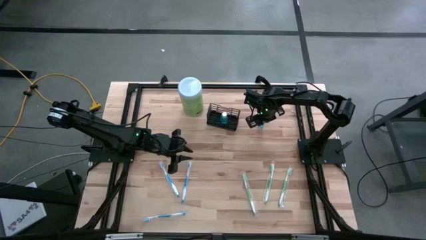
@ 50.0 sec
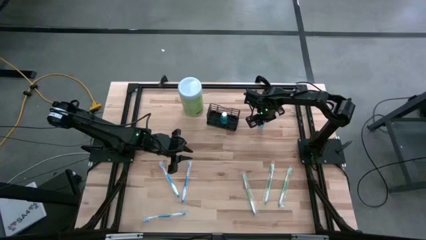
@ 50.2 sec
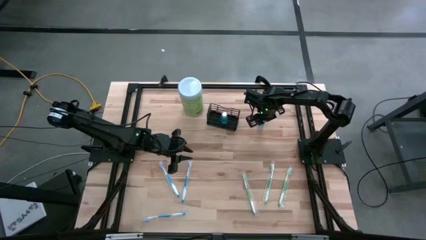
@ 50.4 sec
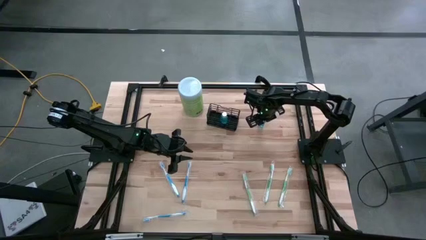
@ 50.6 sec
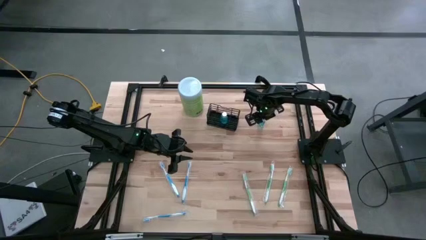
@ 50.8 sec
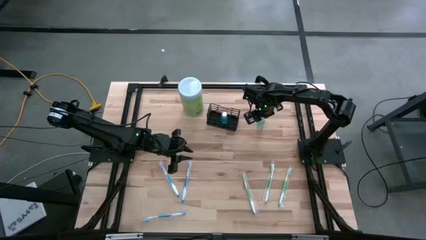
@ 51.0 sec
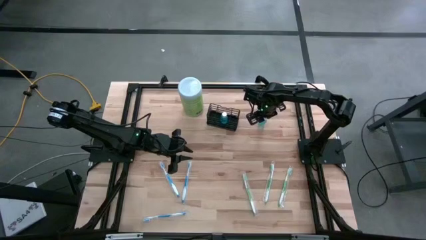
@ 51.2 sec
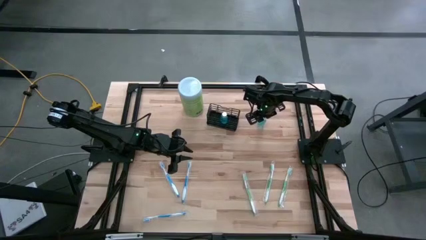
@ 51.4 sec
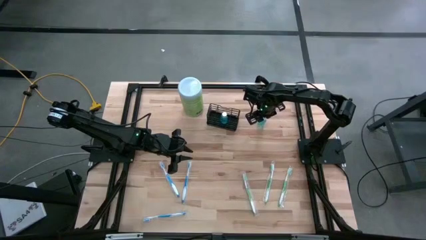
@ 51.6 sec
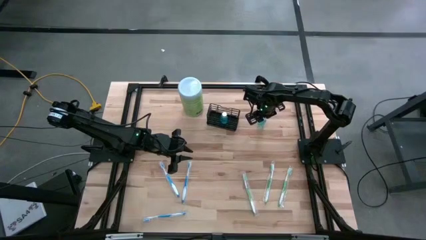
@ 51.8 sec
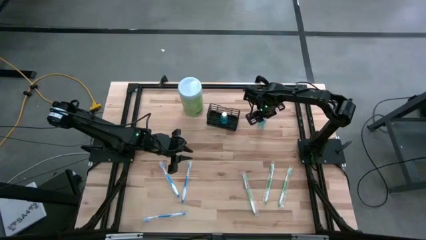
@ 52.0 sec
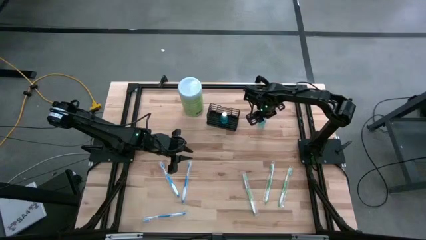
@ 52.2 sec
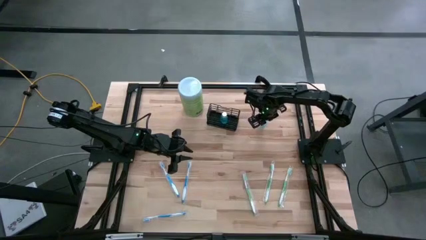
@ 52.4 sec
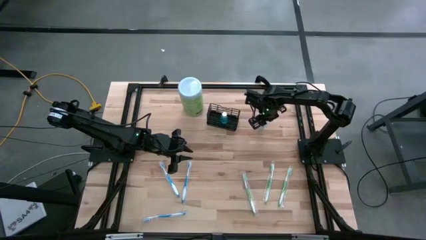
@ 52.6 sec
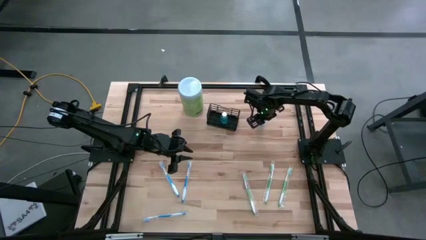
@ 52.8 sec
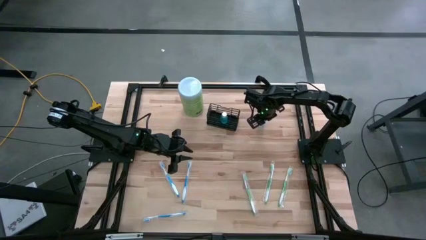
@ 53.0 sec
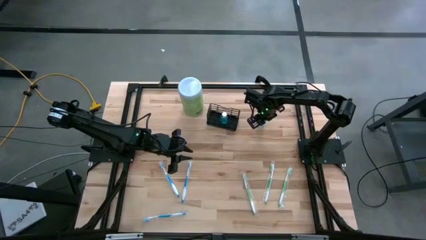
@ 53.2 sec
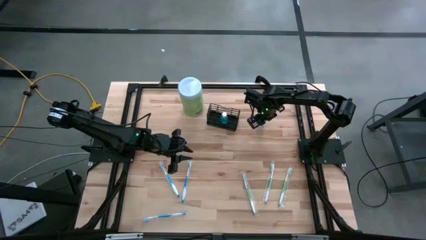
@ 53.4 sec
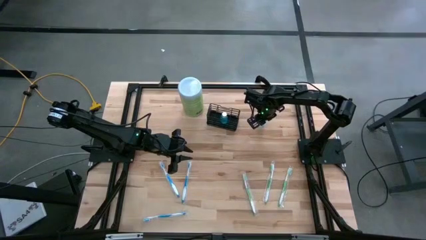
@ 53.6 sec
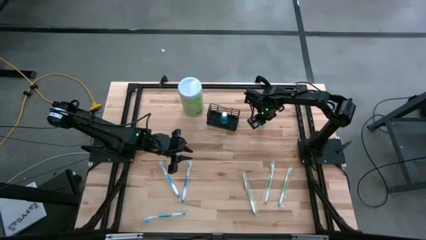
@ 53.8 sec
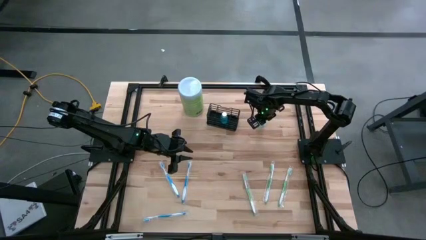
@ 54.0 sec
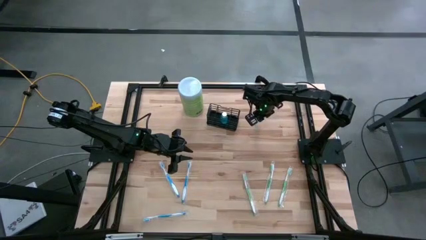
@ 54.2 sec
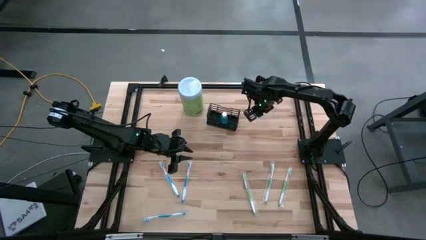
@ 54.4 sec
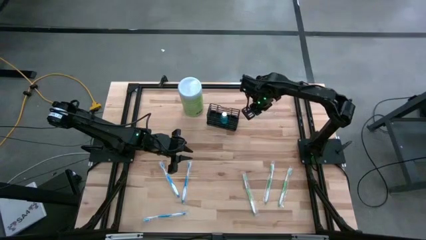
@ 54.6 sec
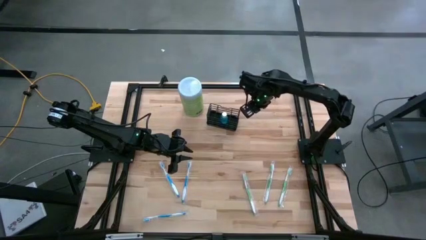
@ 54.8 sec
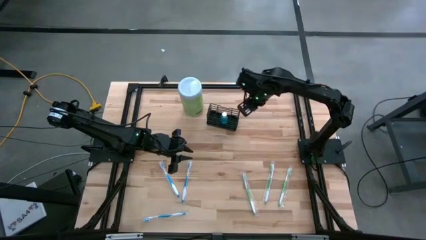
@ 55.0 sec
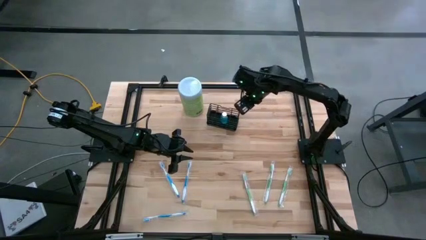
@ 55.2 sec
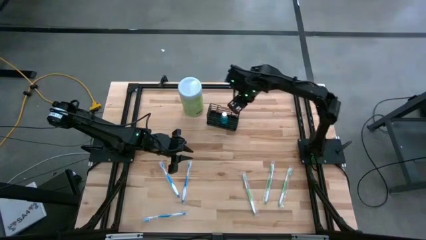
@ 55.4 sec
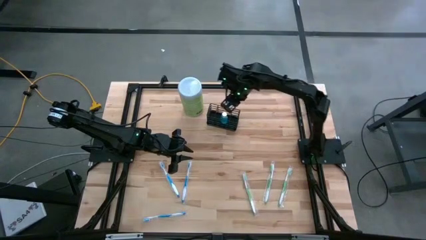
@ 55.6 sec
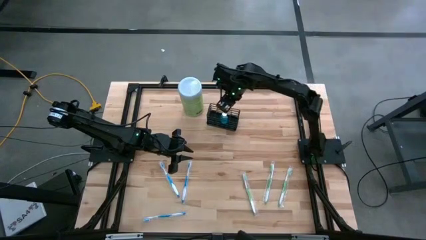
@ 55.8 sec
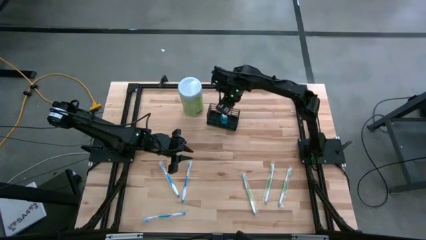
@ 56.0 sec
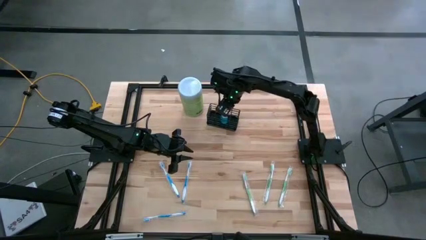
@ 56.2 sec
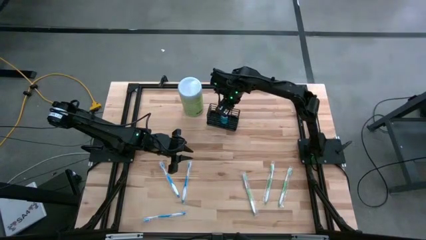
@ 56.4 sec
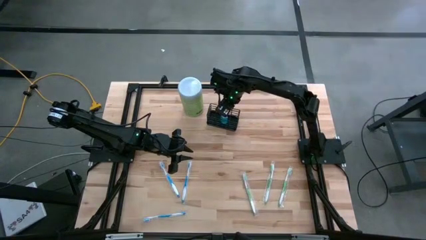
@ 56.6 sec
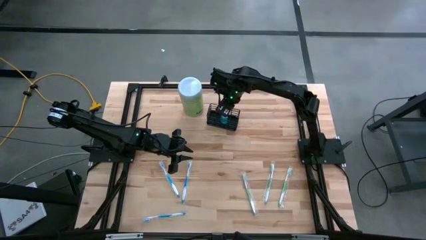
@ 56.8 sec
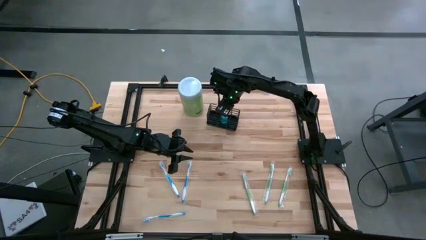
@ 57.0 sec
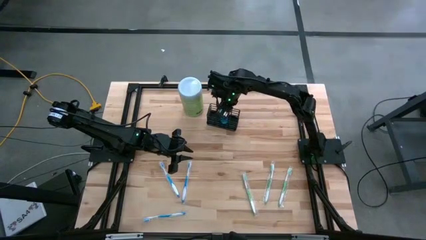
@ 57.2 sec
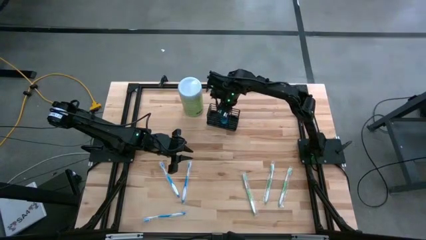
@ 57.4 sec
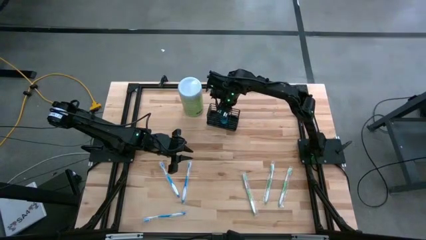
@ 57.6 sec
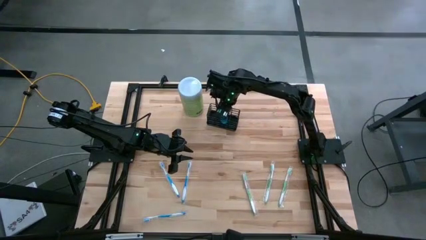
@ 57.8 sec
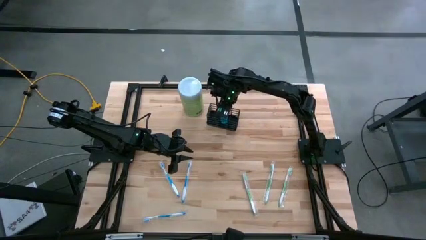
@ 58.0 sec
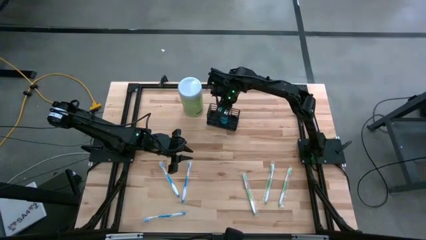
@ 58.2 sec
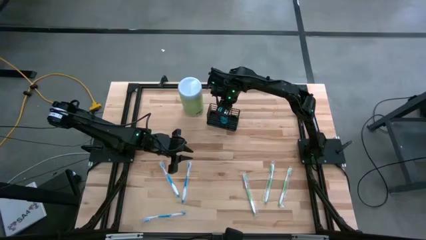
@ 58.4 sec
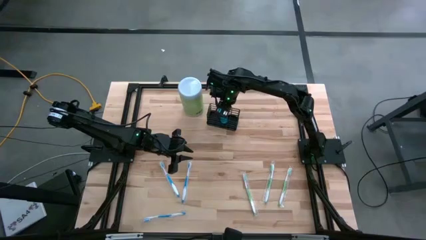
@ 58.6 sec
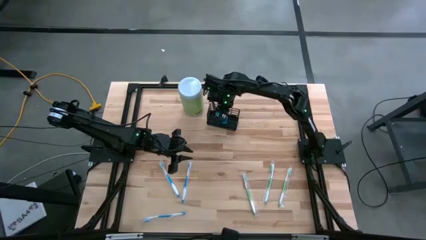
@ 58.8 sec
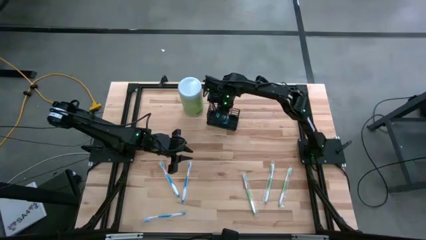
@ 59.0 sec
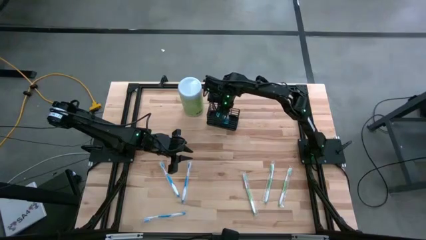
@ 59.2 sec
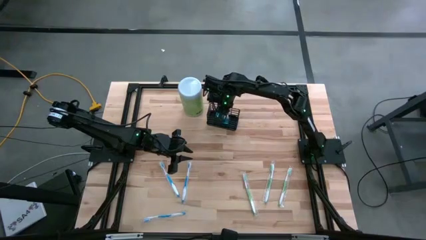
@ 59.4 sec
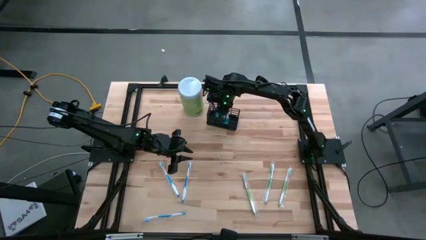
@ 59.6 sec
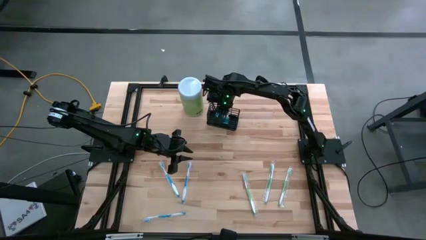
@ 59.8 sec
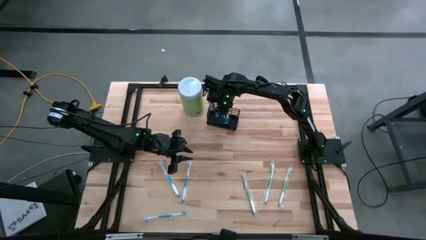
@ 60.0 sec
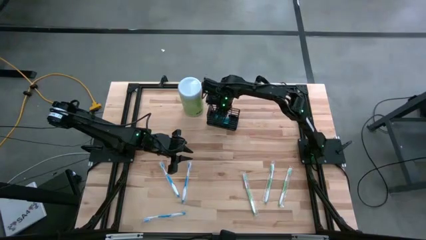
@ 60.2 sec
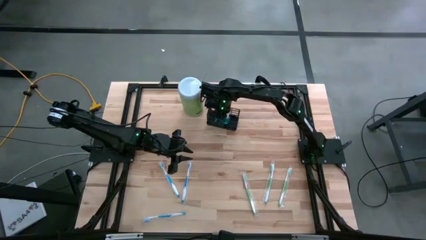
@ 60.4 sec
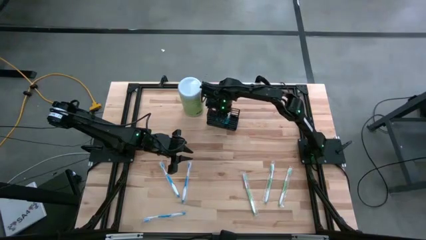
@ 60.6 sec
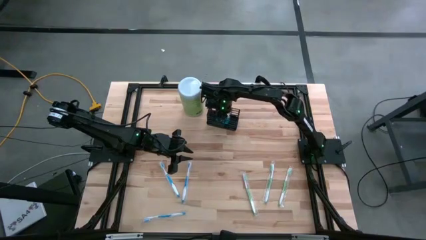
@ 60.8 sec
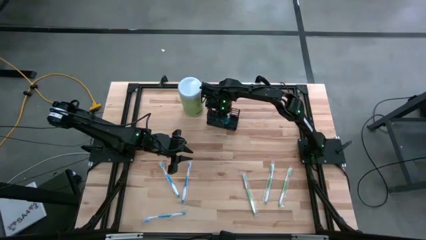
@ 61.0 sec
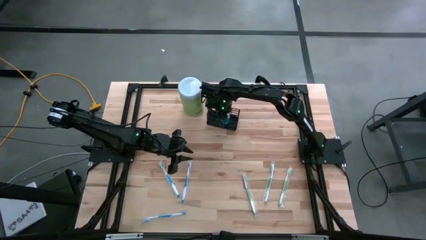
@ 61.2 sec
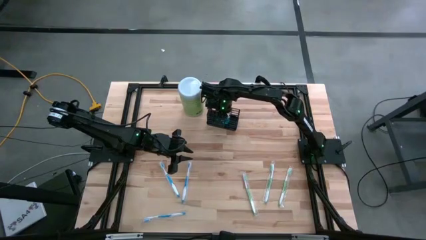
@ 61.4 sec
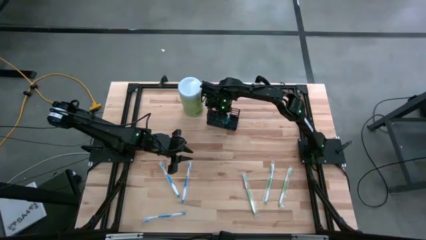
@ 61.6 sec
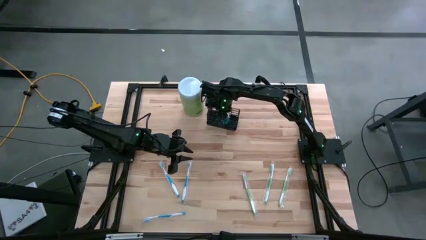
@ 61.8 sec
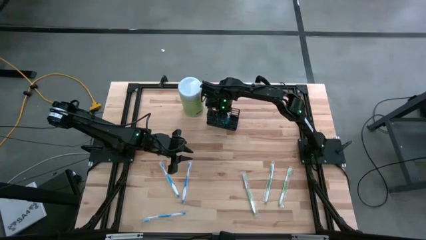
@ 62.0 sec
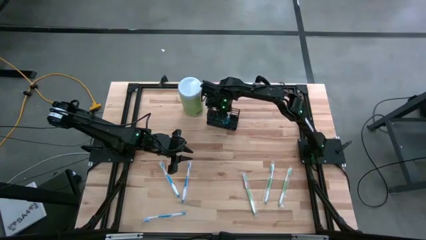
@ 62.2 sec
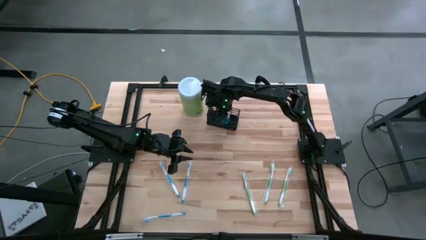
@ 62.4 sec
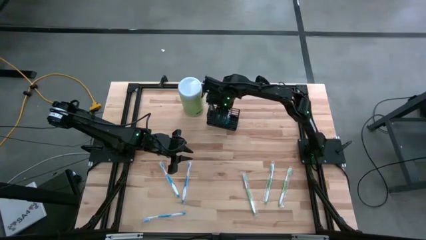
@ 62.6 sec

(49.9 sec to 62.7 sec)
Task: Pick & Place toothbrushing station
Put the mouthwash into the mesh organizer

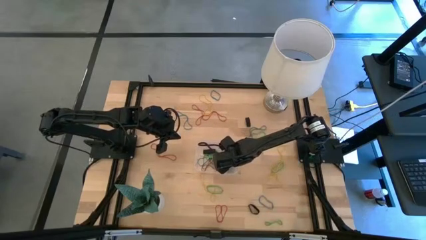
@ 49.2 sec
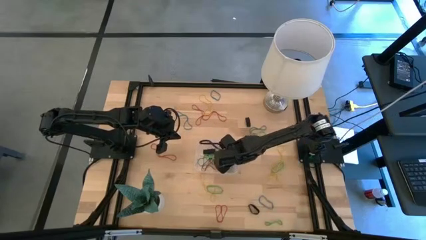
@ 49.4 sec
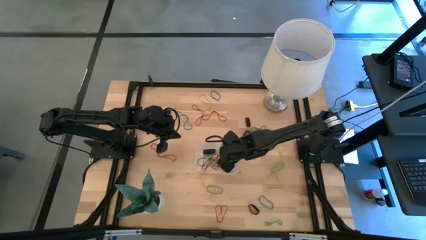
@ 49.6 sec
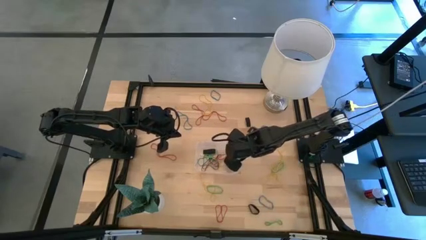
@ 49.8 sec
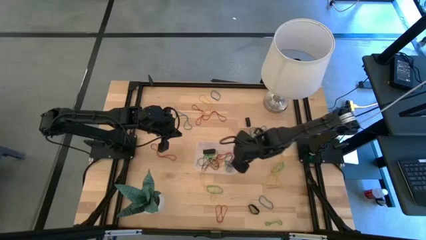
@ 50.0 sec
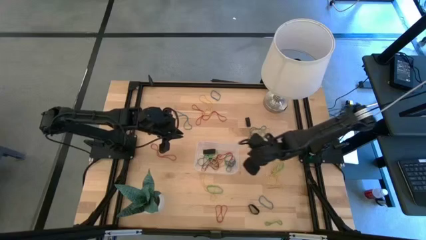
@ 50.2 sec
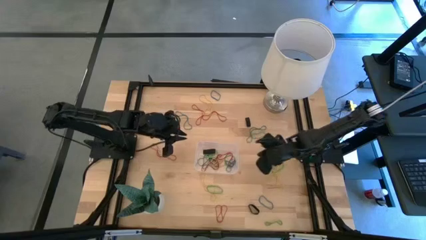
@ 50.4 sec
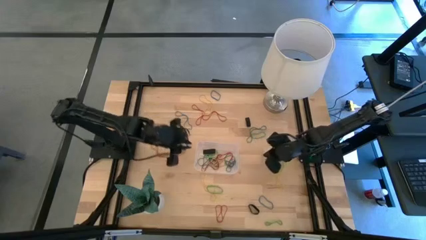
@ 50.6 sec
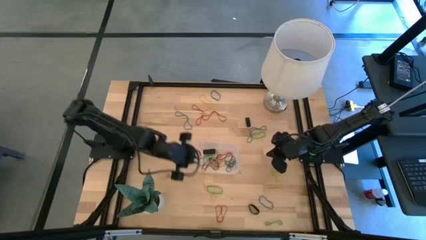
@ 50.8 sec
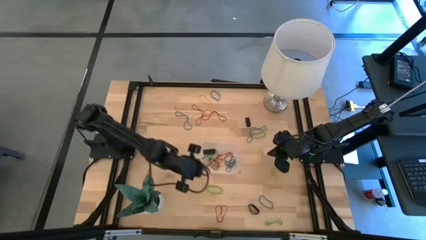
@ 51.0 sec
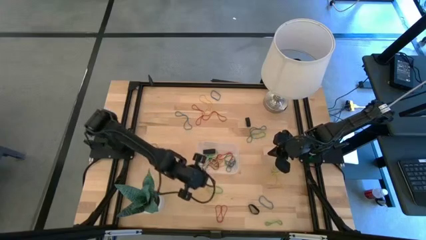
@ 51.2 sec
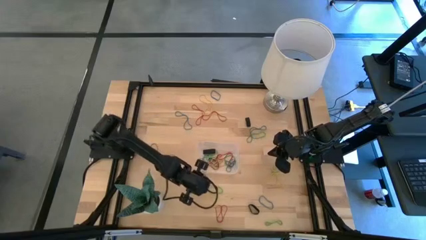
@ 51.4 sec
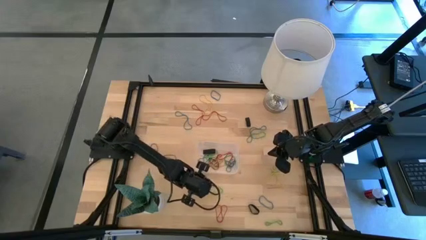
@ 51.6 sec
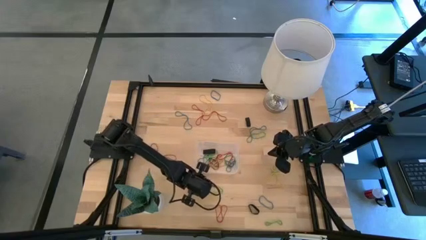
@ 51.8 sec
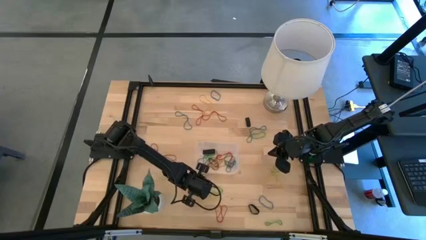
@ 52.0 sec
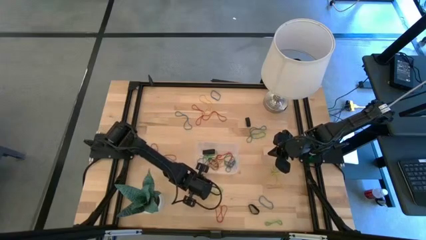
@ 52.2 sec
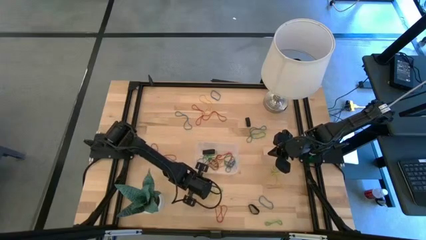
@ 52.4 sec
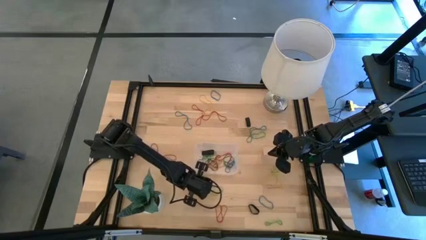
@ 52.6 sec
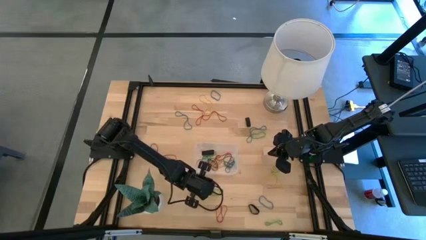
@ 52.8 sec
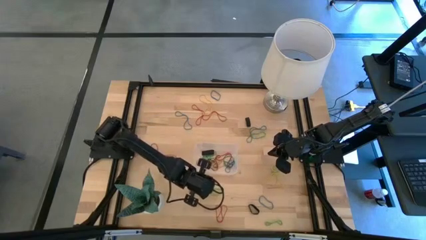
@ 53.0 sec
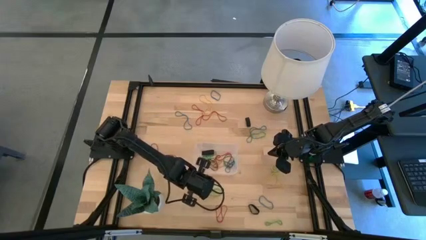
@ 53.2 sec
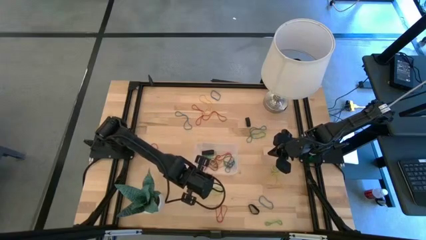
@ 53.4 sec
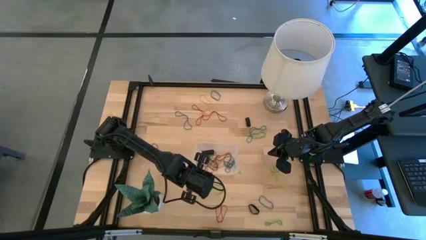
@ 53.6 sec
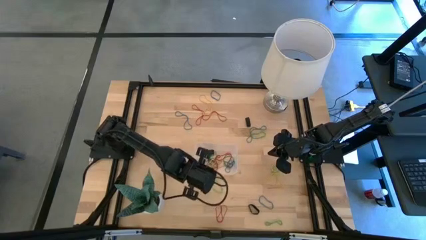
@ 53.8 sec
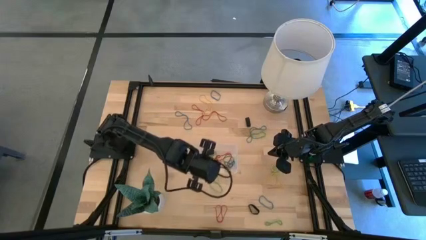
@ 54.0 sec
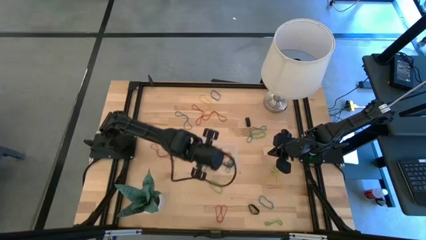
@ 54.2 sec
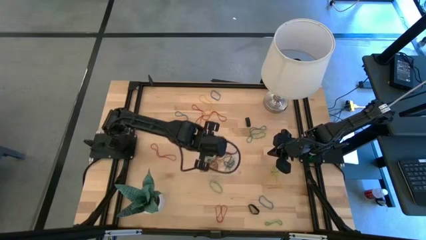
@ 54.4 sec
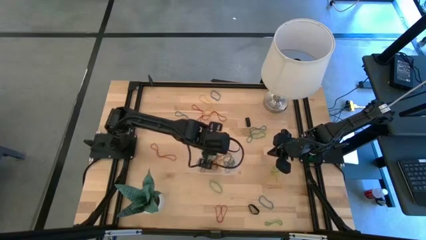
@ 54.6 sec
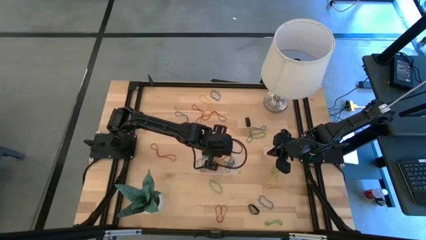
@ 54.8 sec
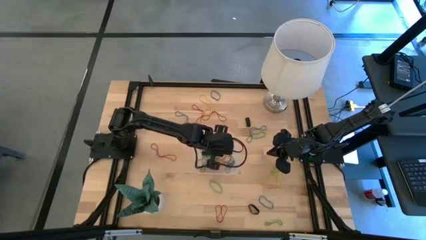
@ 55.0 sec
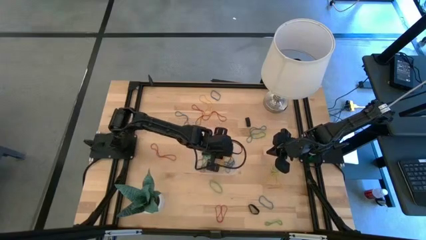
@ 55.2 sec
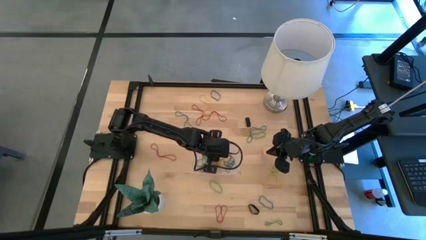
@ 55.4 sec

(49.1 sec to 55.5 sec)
Task: Pick and place rubber bands into bin
Put the yellow rubber band into the transparent bin
